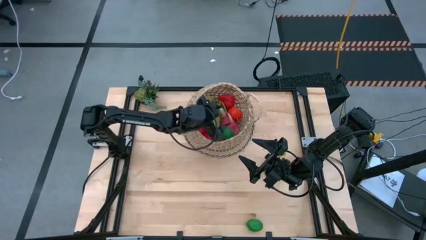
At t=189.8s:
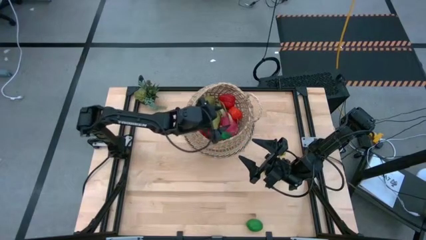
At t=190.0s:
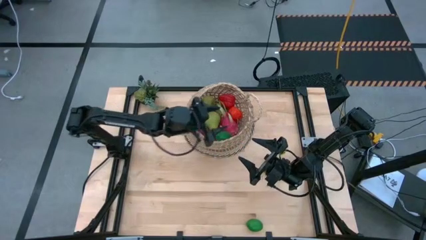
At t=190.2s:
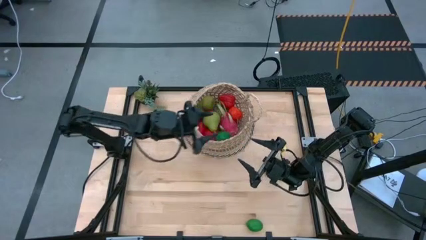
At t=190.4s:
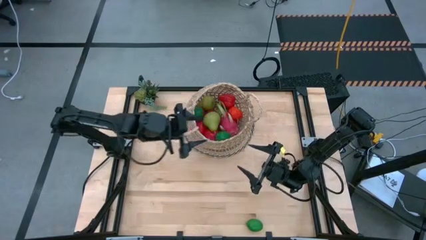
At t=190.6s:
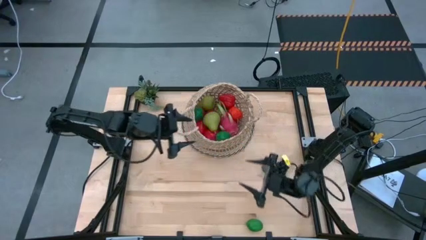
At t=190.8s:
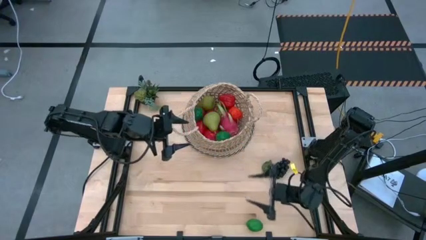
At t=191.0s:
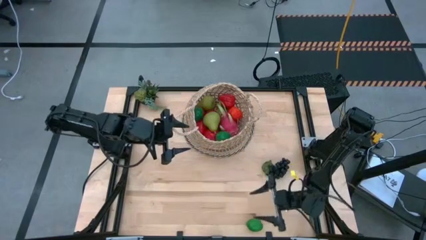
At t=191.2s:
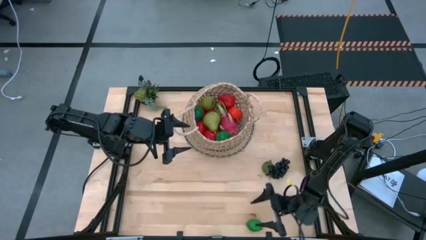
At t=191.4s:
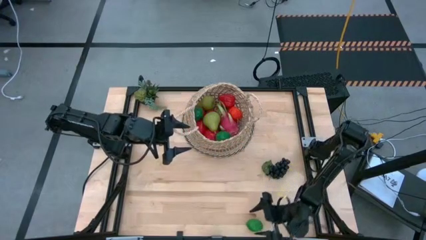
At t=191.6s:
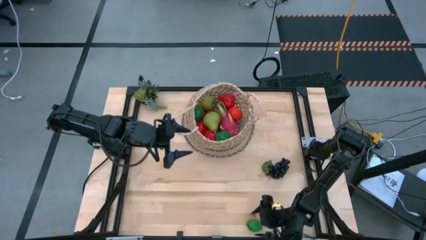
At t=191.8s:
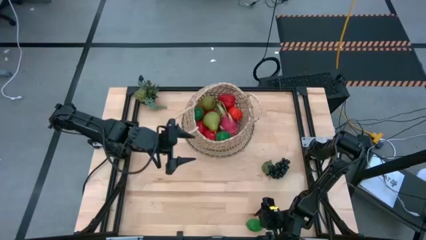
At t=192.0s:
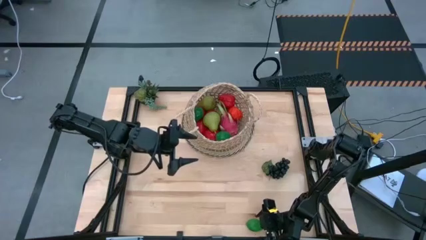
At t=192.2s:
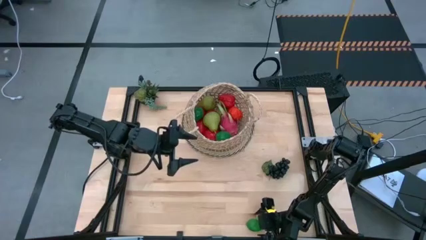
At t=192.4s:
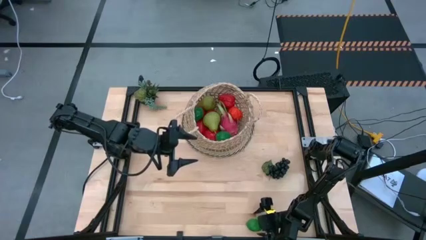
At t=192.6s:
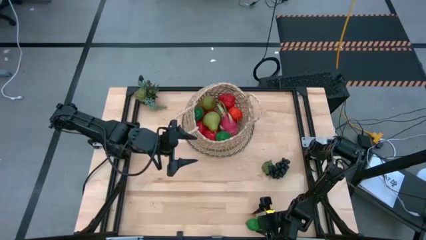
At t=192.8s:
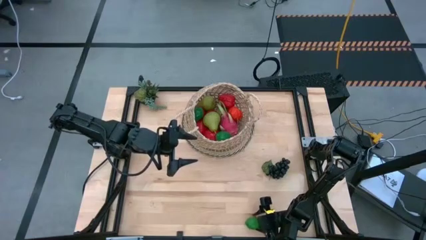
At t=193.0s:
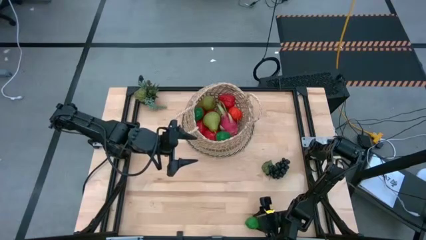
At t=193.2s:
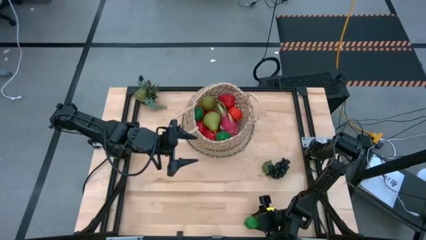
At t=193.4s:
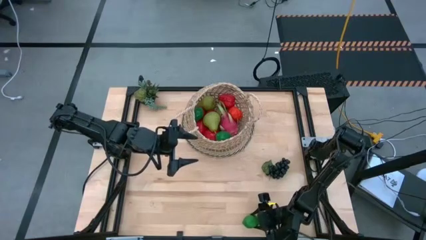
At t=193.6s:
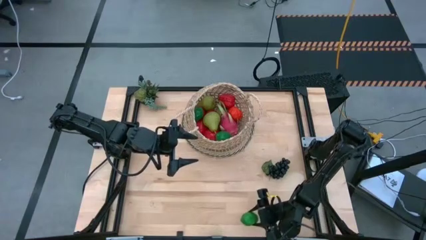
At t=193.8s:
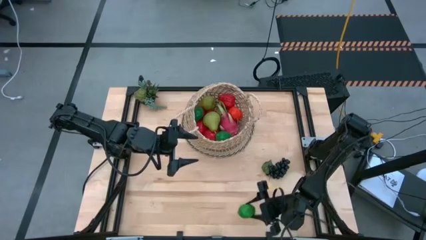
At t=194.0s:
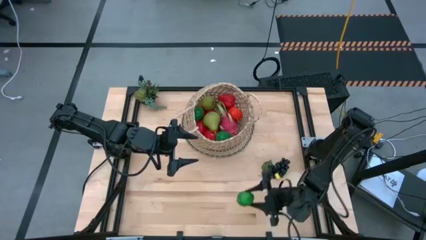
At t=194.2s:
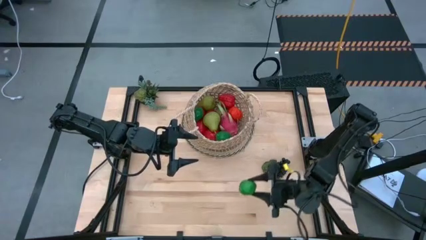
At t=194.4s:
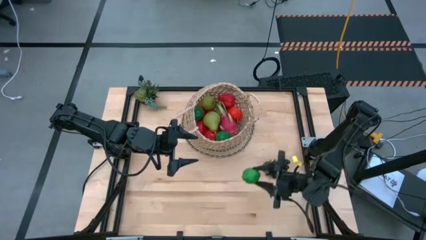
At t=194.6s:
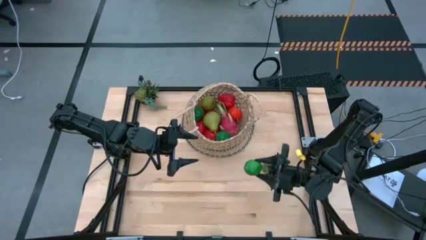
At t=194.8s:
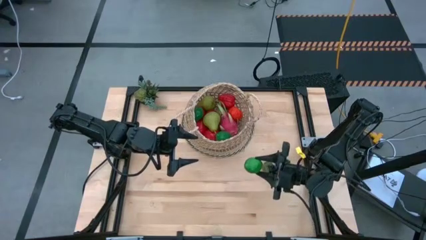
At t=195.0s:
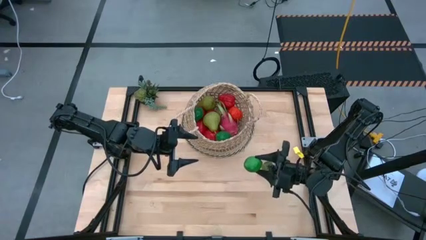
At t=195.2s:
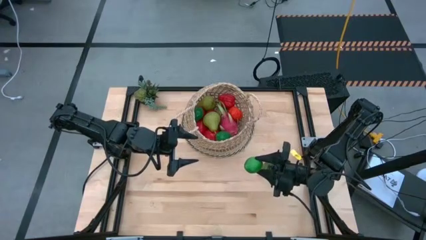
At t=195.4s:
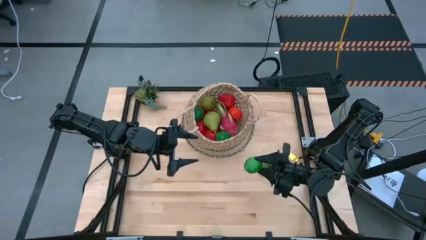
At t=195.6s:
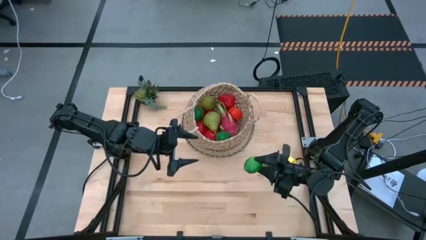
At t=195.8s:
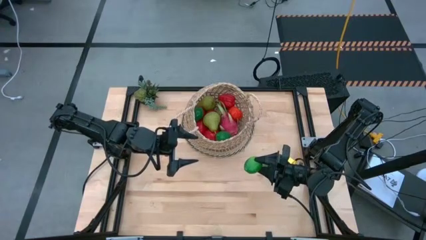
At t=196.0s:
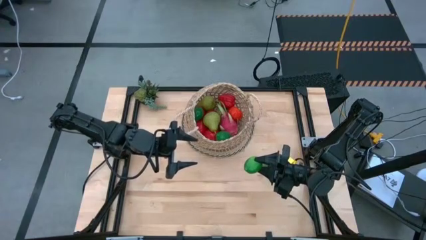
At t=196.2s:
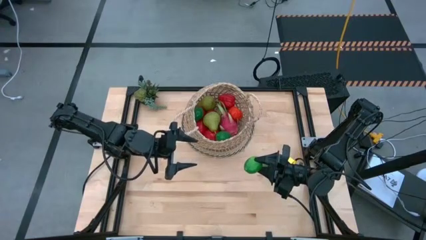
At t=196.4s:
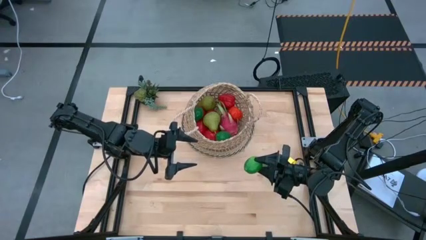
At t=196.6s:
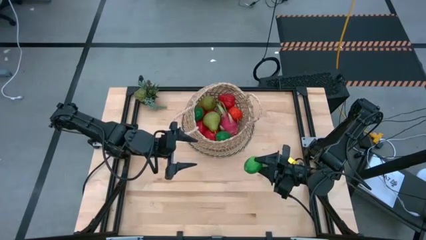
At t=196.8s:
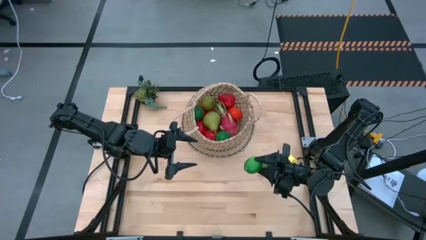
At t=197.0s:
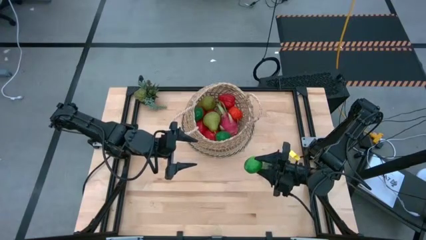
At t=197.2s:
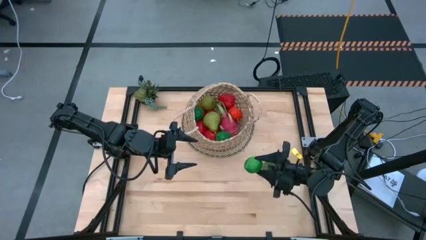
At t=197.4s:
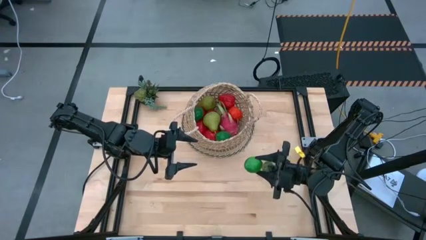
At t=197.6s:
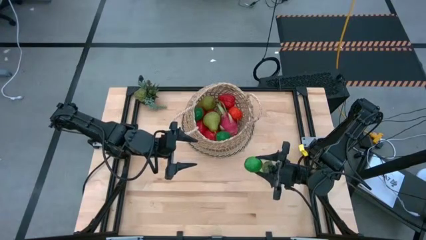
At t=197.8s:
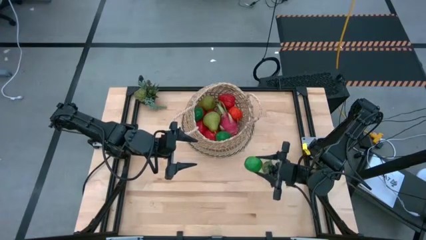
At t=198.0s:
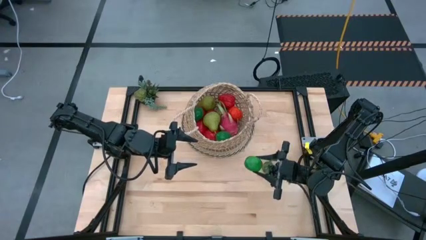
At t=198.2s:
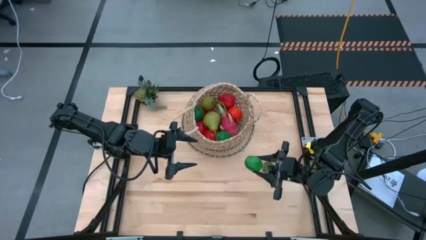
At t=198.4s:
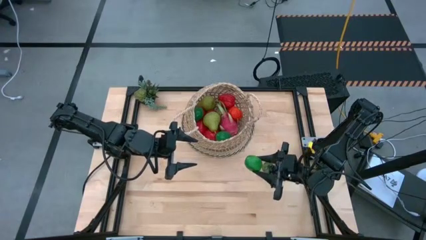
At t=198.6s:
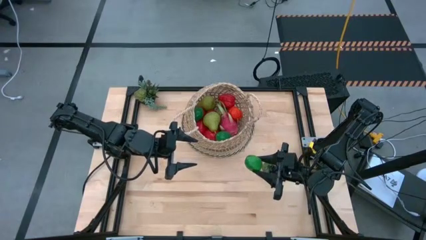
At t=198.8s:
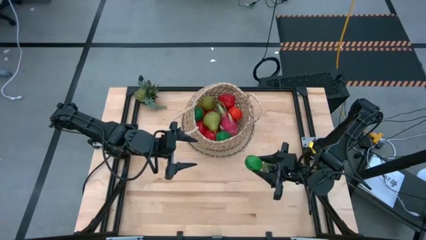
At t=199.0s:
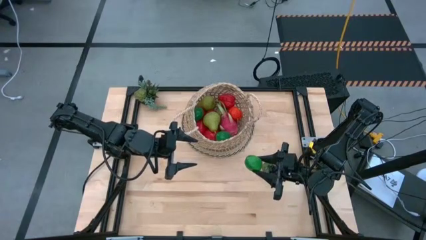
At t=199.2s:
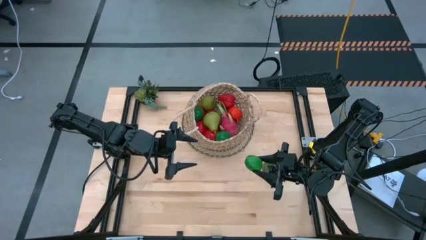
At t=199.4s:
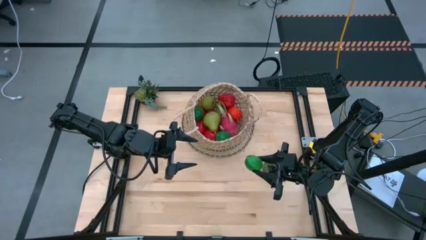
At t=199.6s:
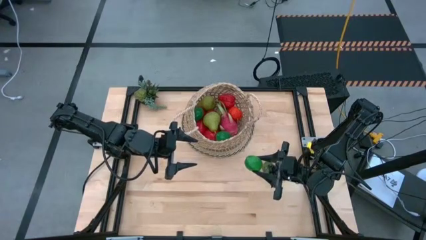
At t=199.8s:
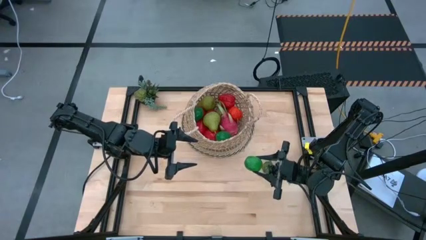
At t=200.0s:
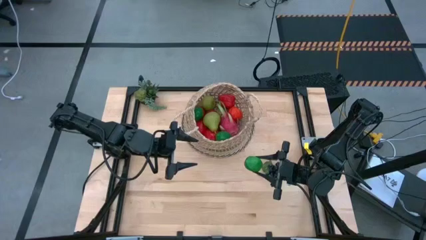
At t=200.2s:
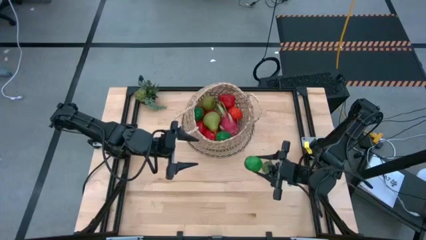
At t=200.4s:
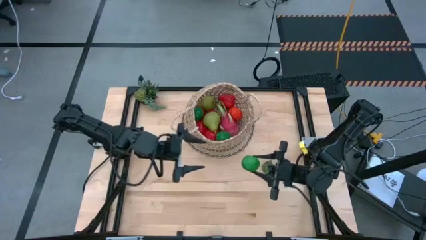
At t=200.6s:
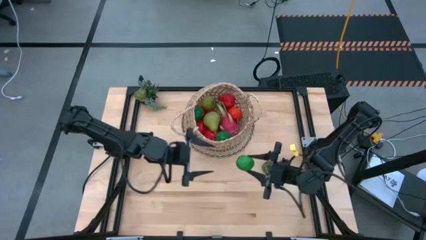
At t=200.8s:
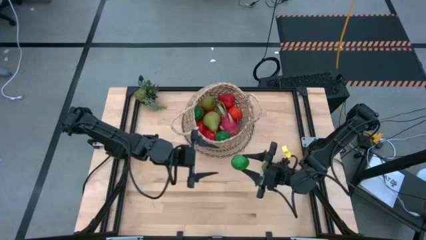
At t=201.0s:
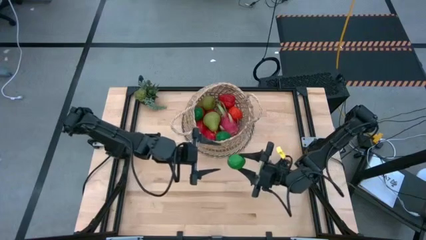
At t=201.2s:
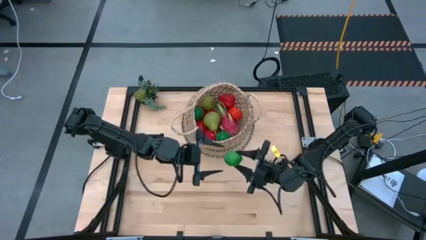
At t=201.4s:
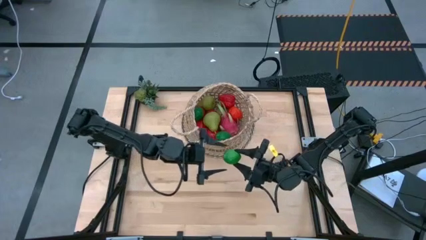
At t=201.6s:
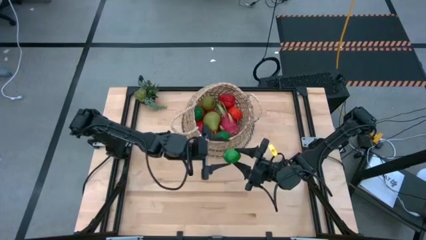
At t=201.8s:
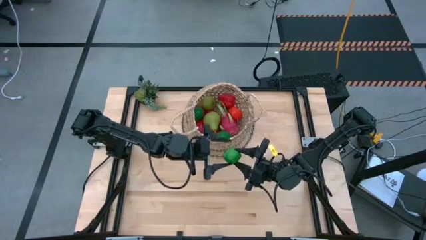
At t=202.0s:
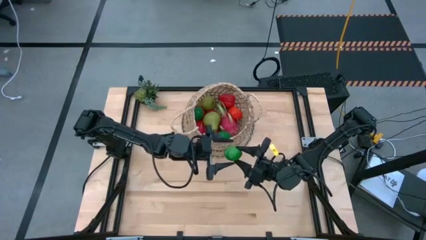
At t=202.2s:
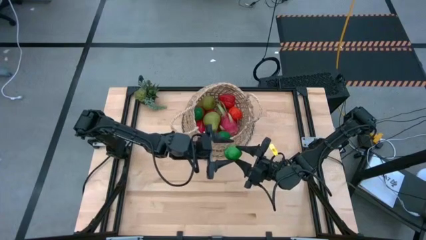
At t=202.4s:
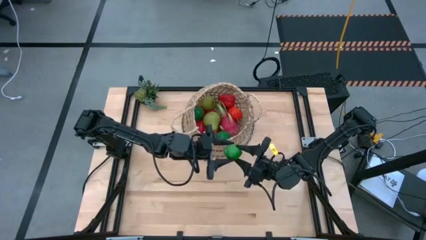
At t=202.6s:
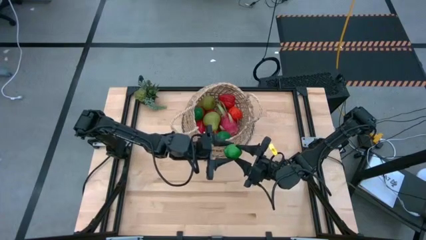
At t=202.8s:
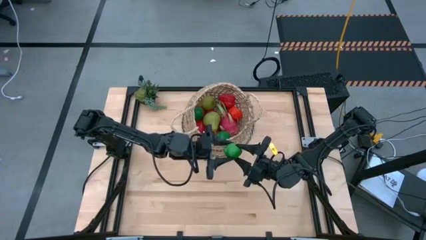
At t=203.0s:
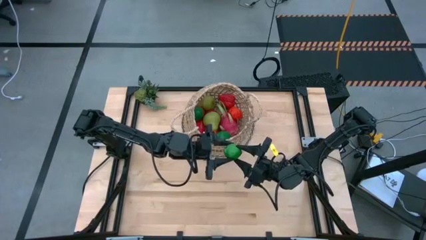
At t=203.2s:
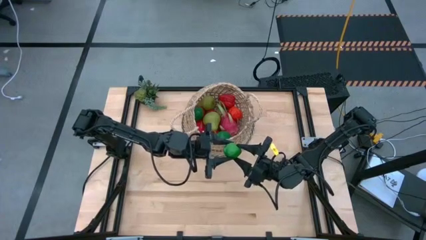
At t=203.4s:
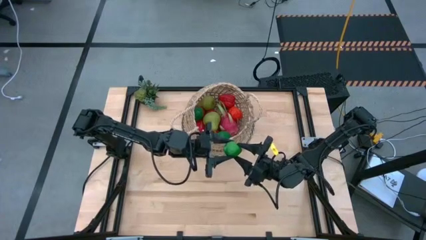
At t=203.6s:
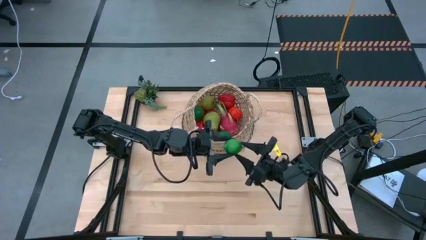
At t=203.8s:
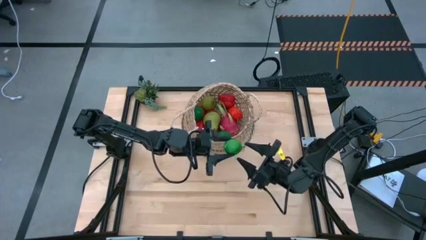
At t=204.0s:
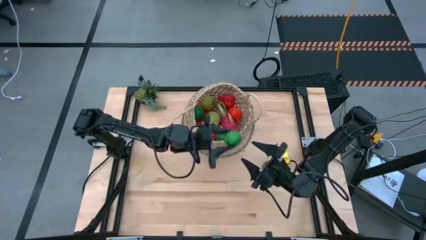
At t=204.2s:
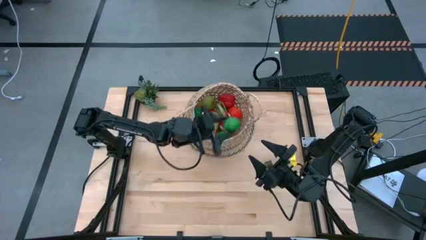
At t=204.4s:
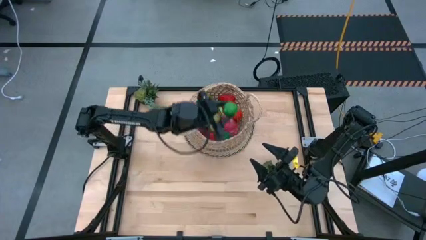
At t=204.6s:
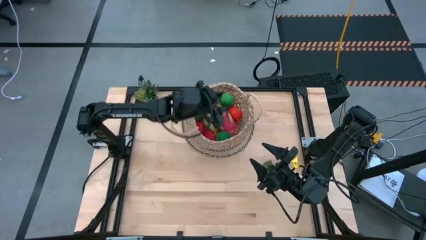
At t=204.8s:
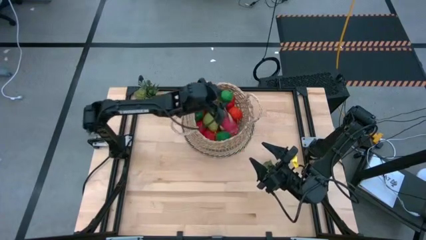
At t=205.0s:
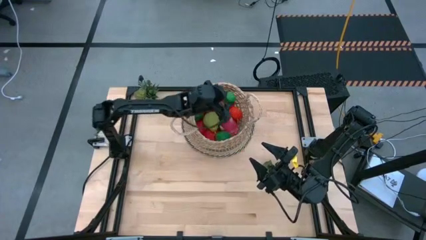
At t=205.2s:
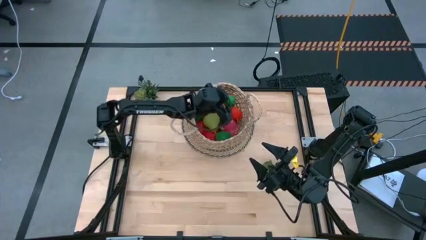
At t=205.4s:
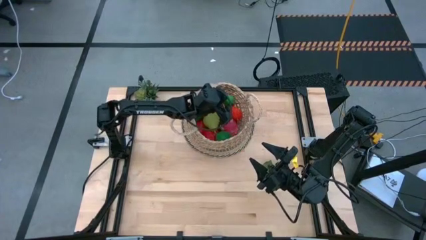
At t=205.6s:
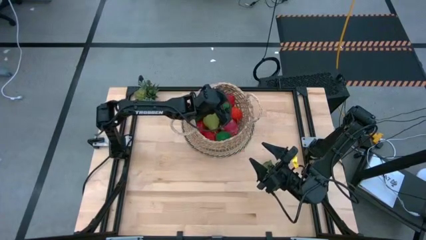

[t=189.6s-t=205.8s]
Task: Build produce basket
Put the green lime into the basket
